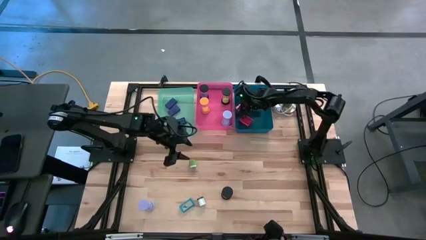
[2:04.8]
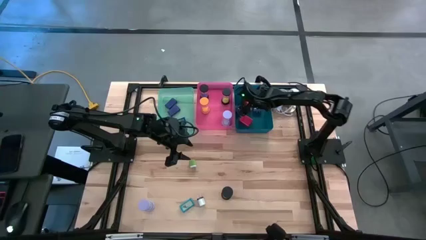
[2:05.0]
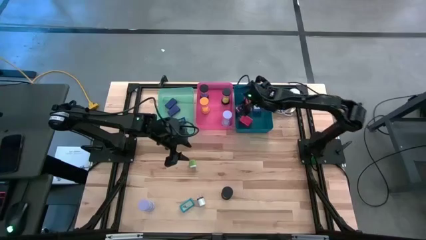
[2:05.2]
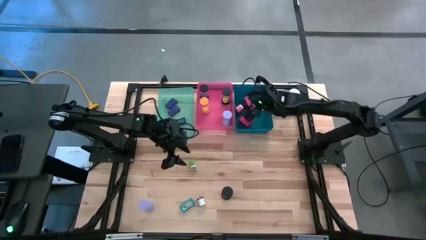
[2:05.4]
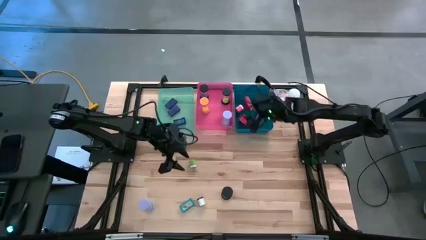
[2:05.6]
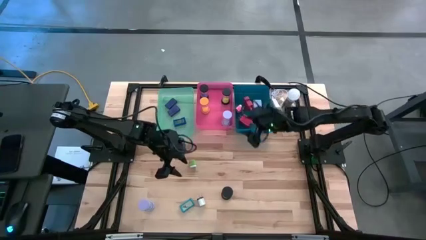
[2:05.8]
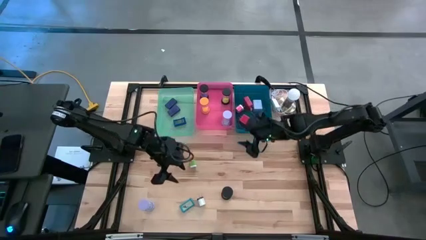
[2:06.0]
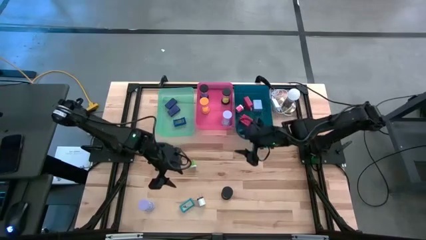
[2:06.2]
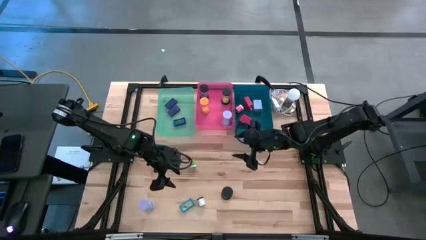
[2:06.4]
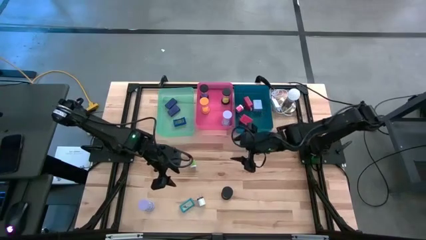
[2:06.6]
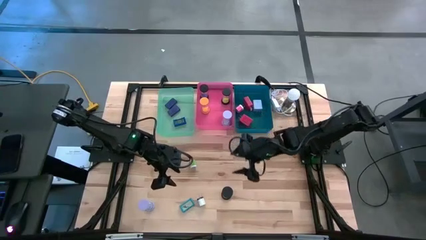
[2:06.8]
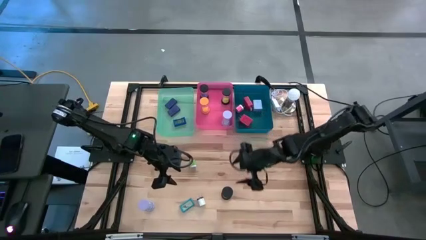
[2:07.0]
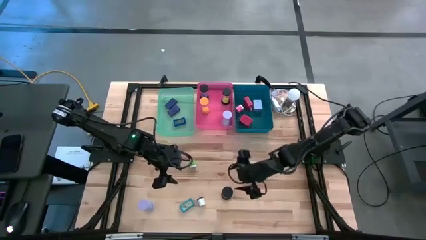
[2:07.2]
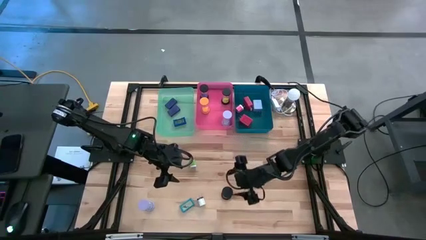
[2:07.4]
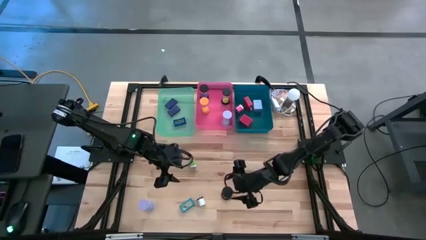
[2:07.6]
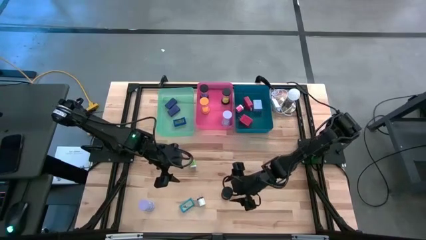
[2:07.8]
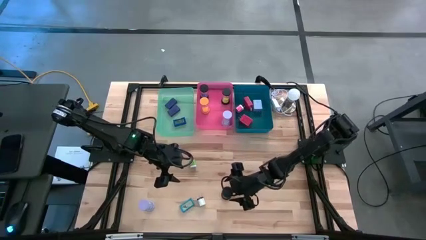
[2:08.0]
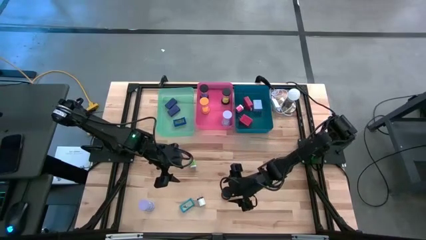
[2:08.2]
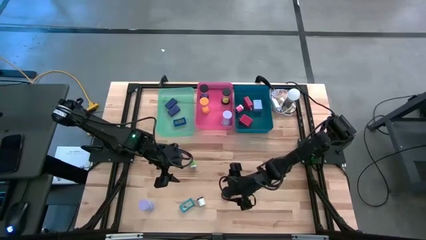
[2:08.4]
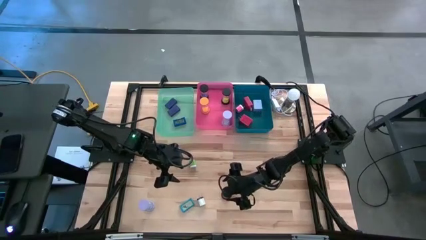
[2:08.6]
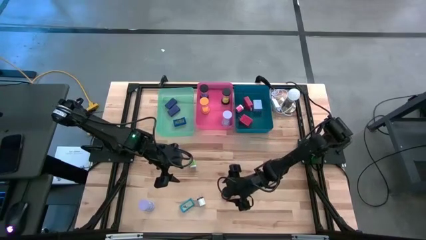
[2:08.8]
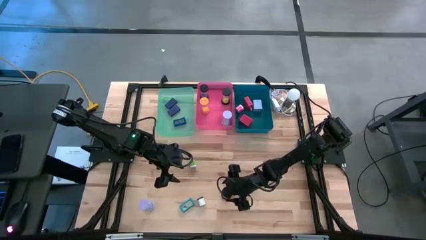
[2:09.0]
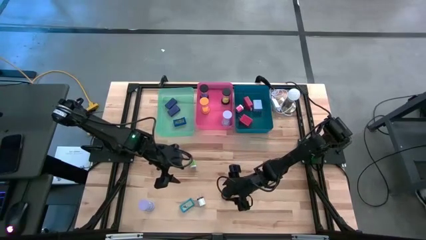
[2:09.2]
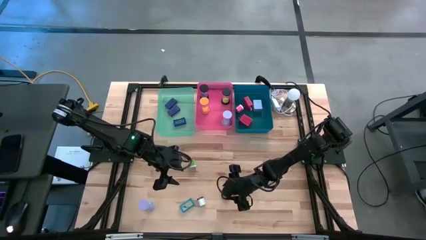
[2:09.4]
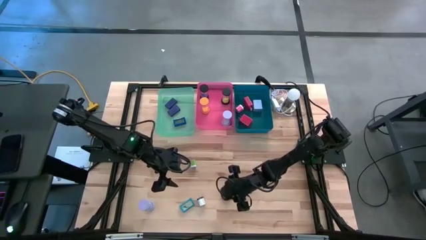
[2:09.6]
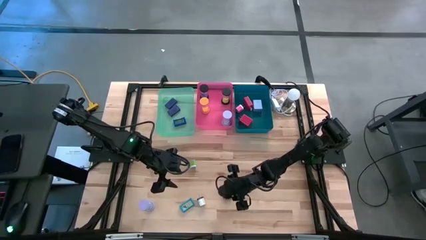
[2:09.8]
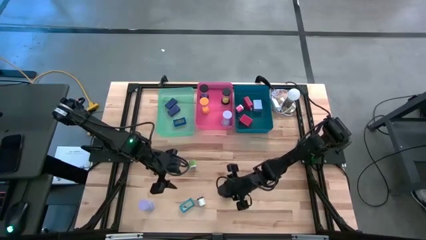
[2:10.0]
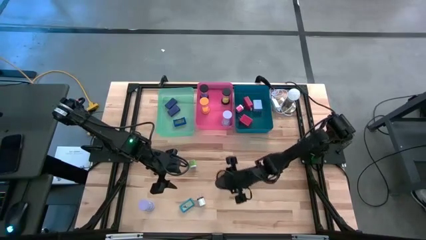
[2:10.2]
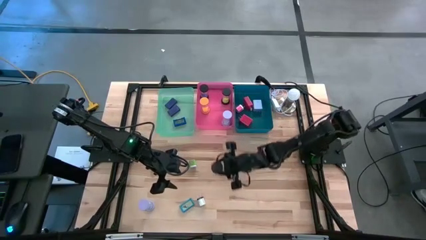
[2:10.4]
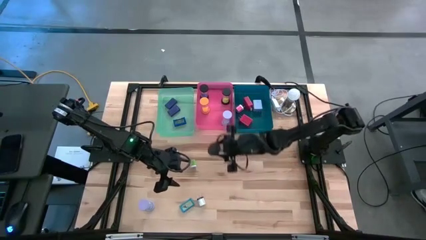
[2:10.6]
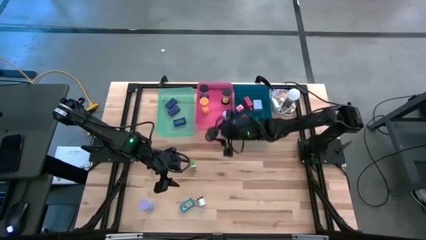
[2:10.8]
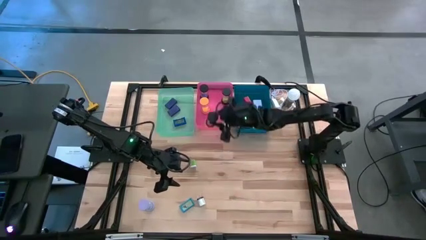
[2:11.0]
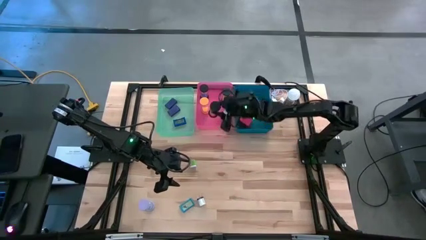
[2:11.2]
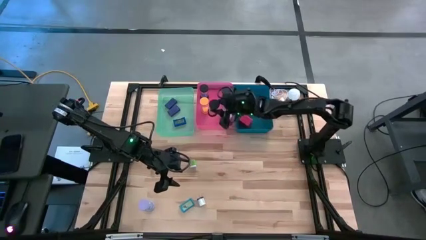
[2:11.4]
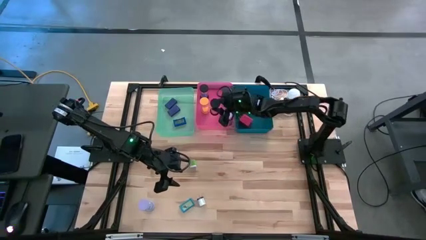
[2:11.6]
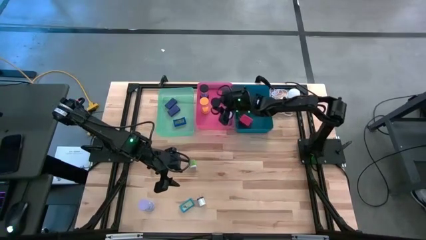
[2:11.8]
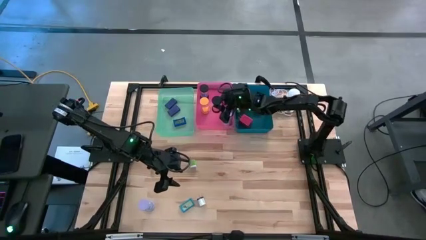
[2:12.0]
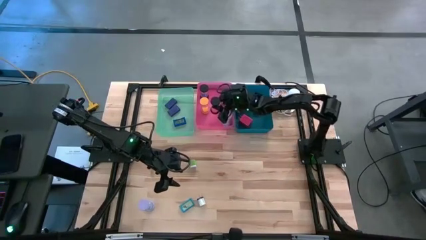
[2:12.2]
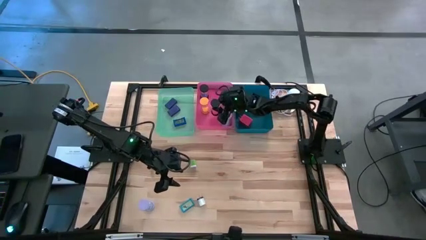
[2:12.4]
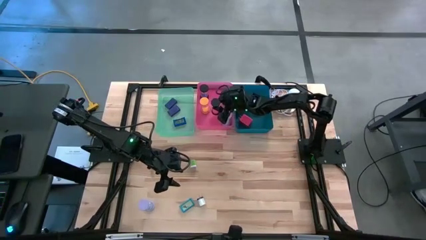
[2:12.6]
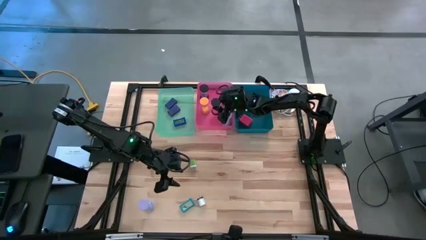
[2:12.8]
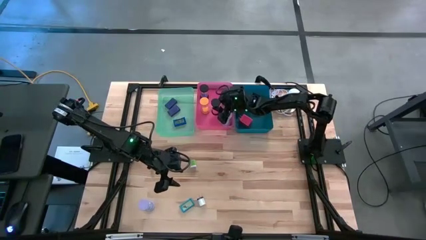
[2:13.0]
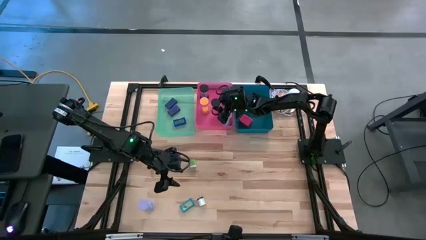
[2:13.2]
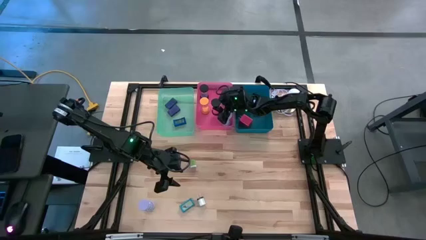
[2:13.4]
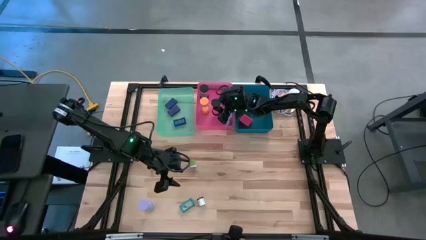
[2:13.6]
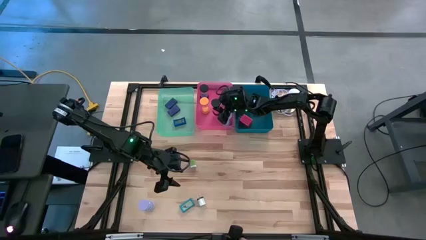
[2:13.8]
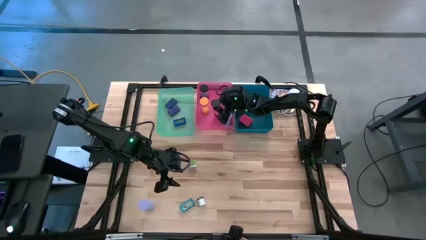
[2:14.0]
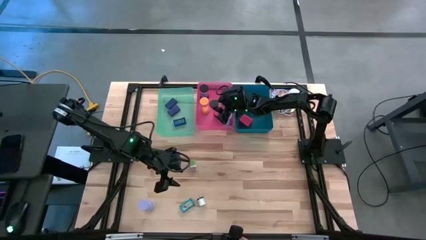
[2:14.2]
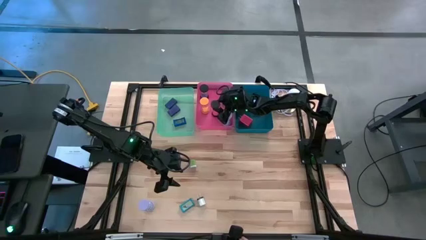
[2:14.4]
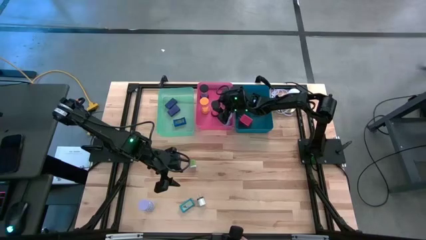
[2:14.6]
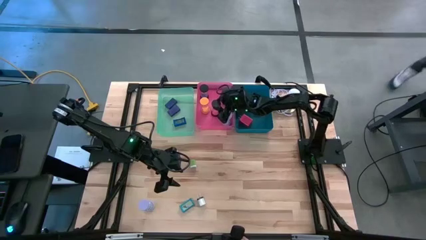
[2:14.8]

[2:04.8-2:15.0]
Task: Pick & Place Office items
Put the red hourglass into the pink bin
